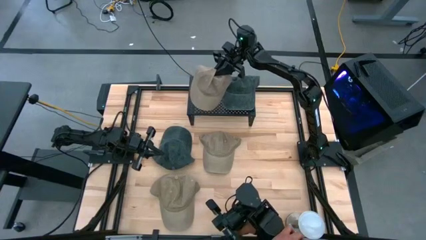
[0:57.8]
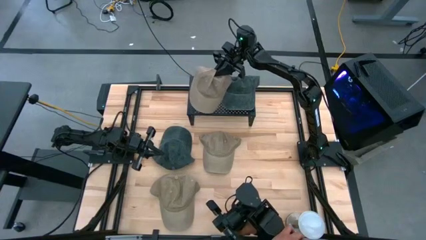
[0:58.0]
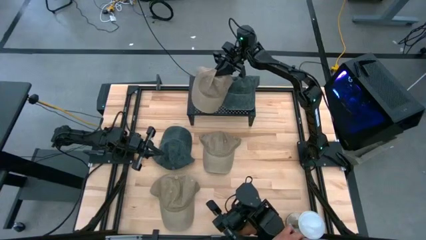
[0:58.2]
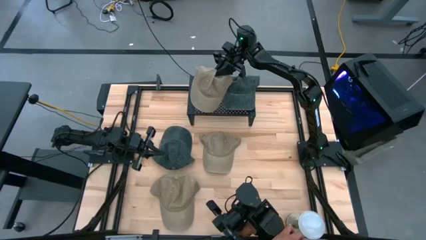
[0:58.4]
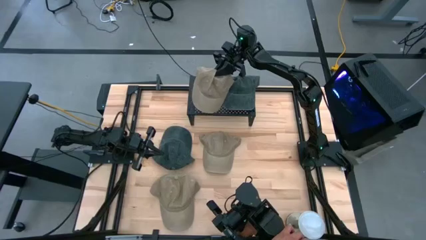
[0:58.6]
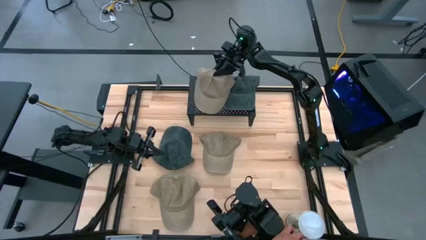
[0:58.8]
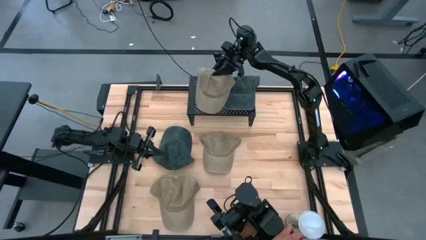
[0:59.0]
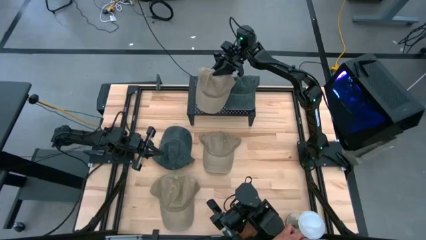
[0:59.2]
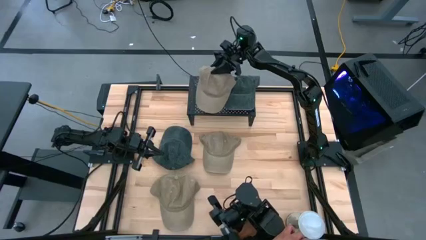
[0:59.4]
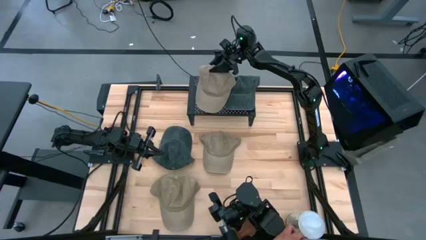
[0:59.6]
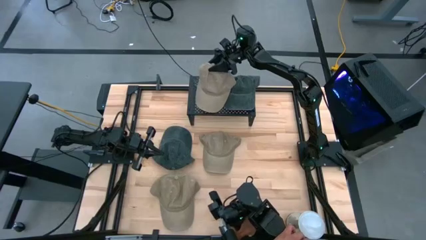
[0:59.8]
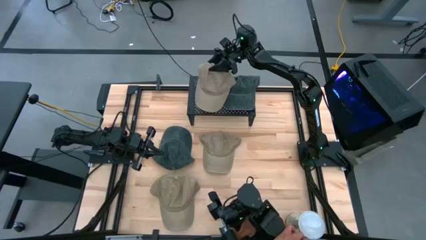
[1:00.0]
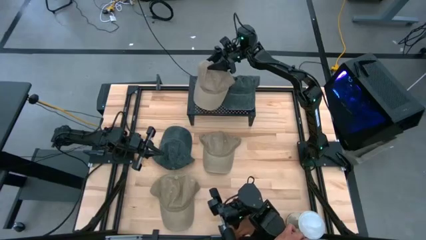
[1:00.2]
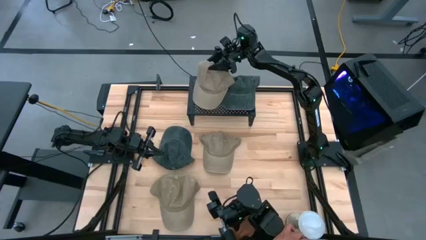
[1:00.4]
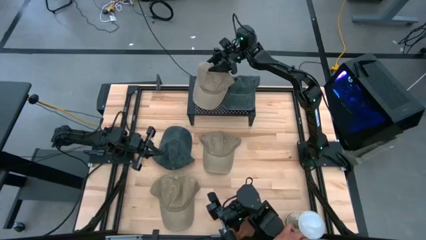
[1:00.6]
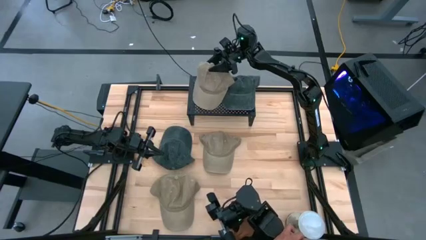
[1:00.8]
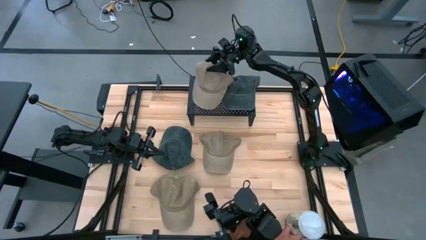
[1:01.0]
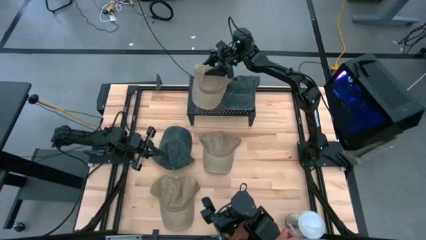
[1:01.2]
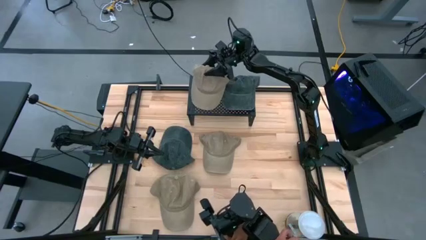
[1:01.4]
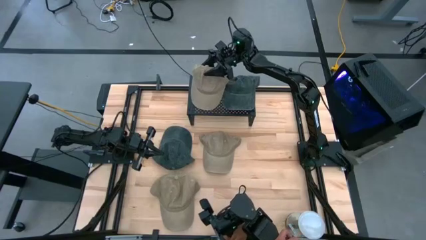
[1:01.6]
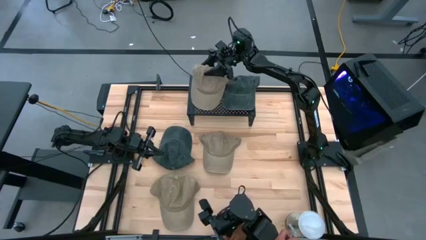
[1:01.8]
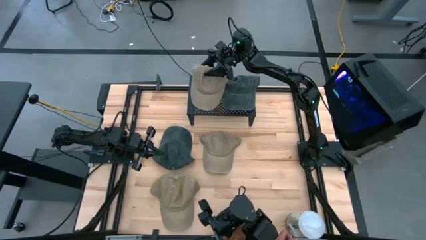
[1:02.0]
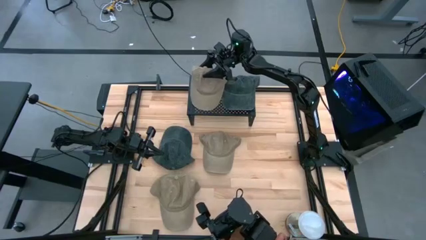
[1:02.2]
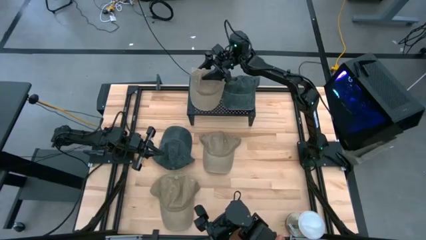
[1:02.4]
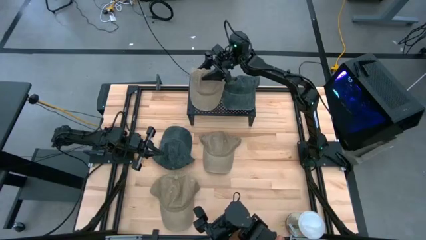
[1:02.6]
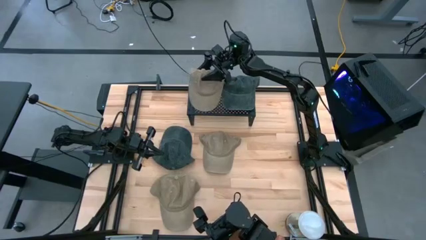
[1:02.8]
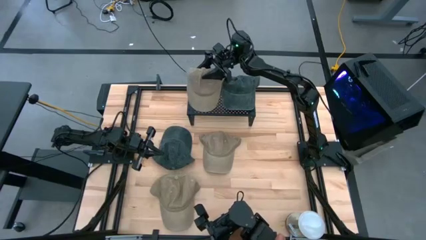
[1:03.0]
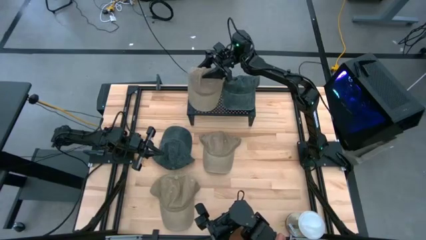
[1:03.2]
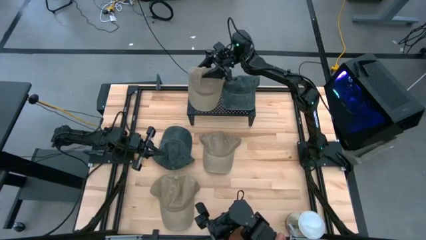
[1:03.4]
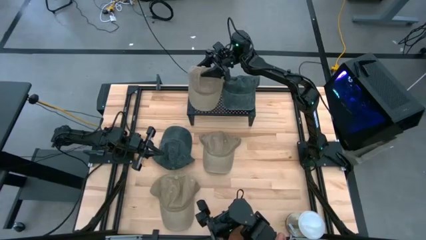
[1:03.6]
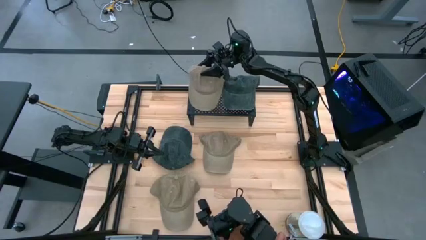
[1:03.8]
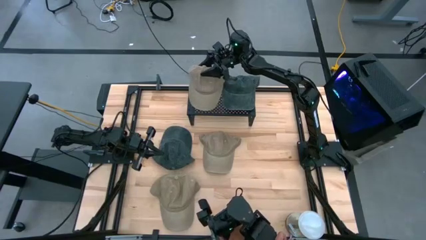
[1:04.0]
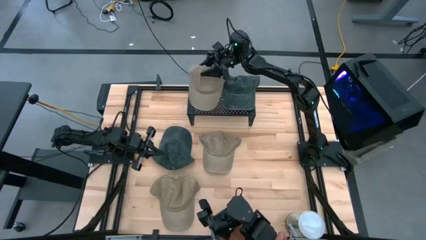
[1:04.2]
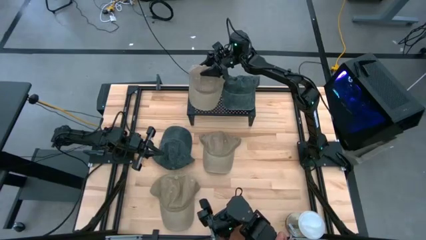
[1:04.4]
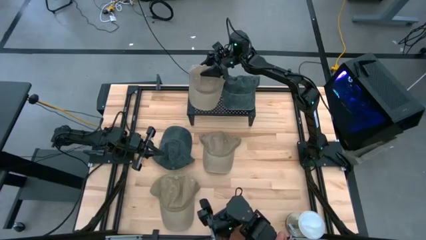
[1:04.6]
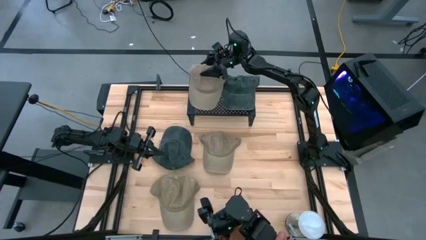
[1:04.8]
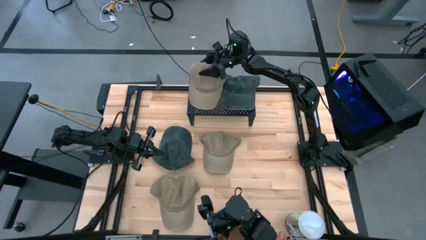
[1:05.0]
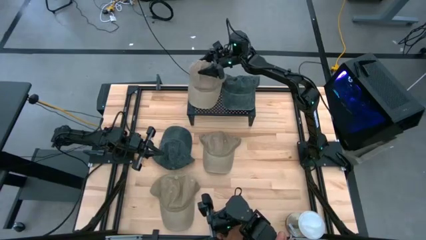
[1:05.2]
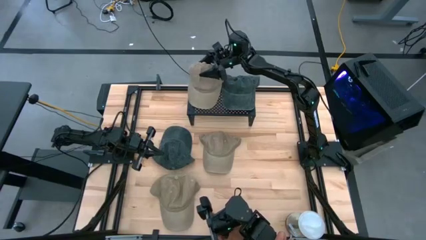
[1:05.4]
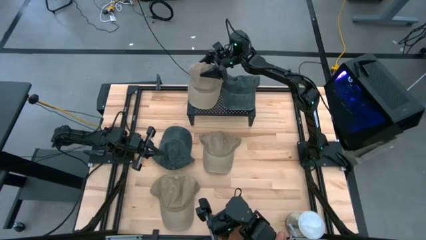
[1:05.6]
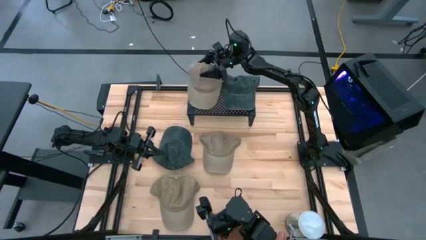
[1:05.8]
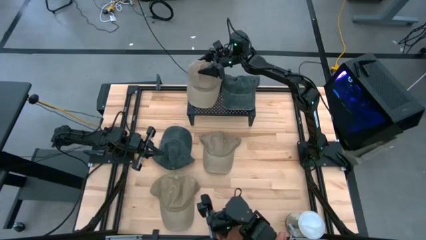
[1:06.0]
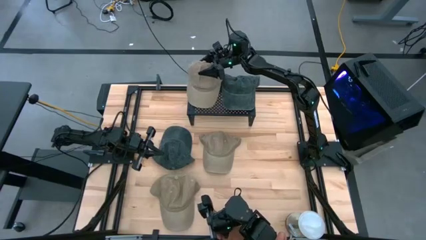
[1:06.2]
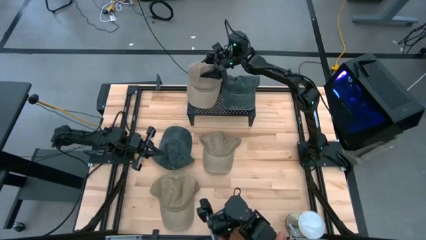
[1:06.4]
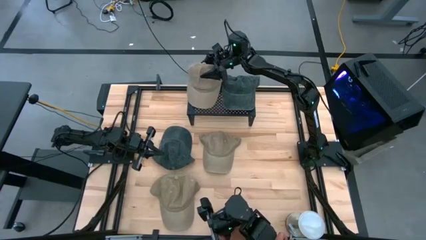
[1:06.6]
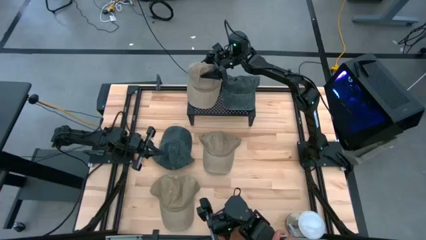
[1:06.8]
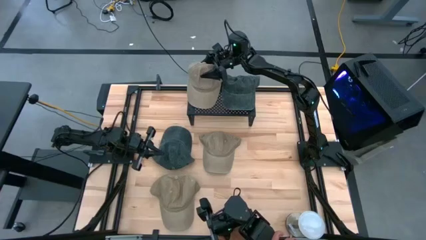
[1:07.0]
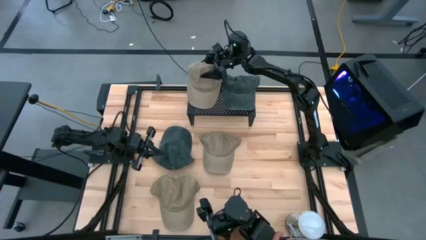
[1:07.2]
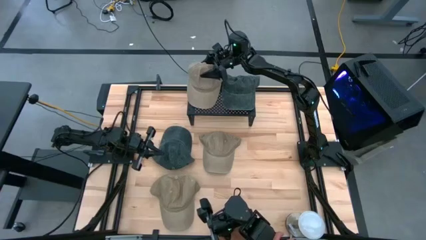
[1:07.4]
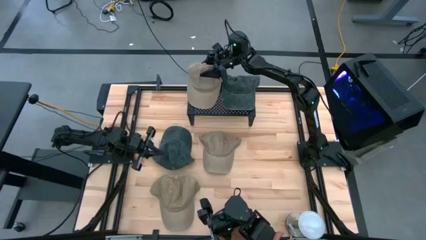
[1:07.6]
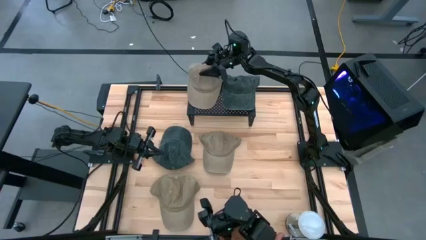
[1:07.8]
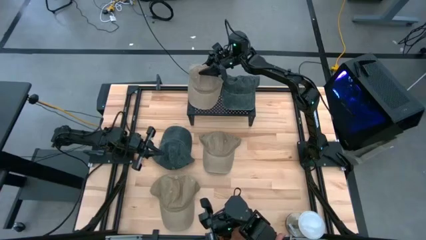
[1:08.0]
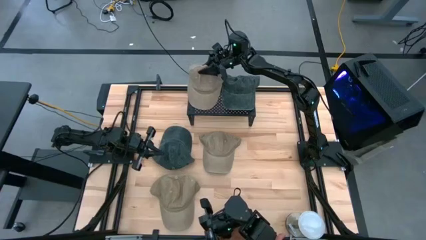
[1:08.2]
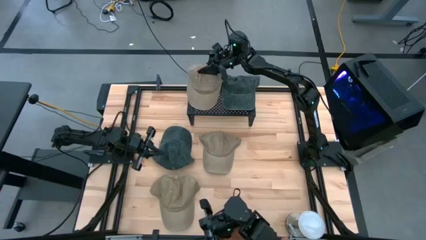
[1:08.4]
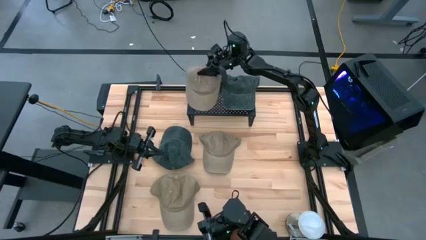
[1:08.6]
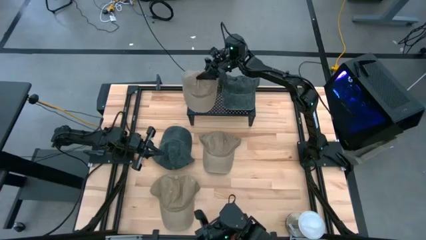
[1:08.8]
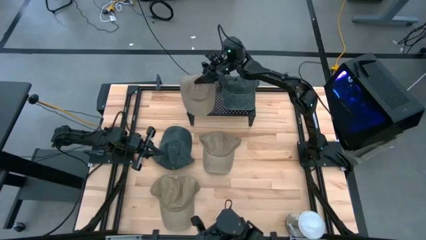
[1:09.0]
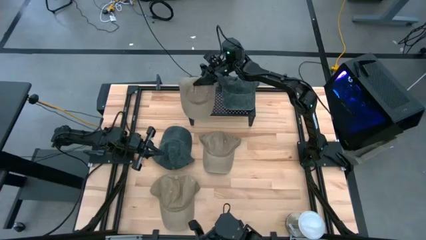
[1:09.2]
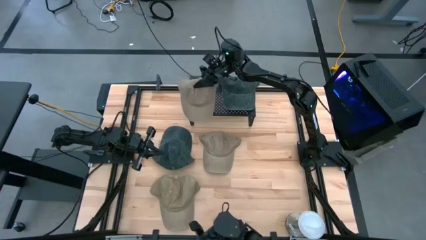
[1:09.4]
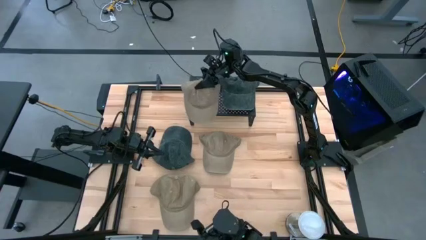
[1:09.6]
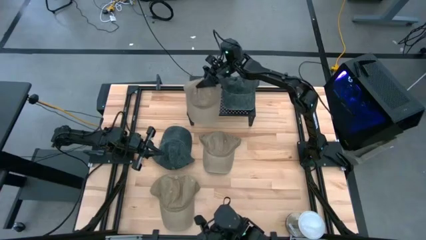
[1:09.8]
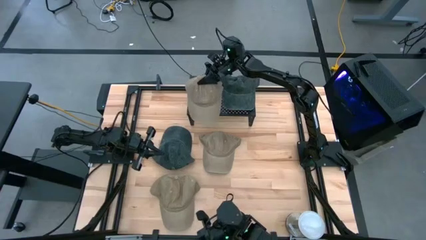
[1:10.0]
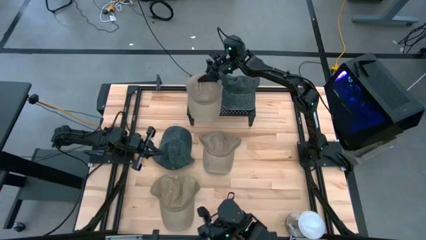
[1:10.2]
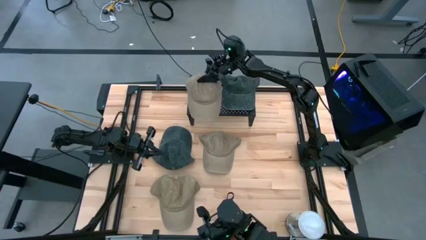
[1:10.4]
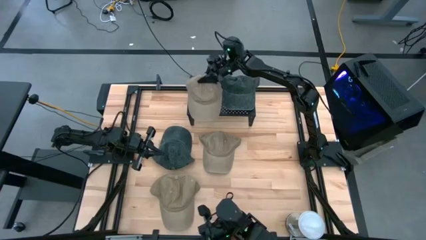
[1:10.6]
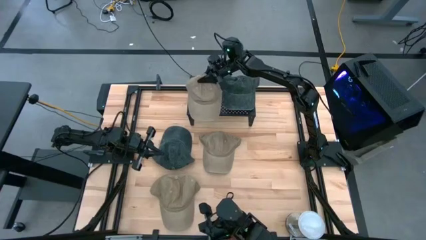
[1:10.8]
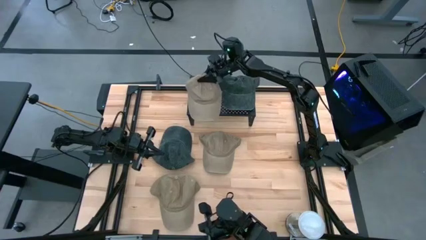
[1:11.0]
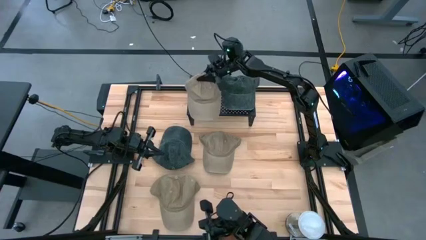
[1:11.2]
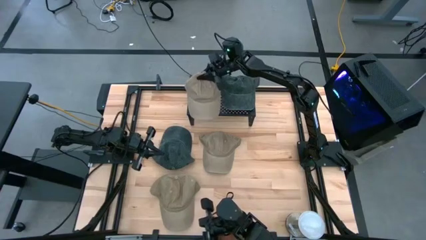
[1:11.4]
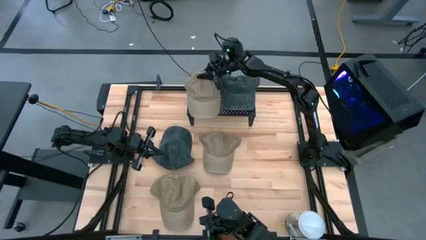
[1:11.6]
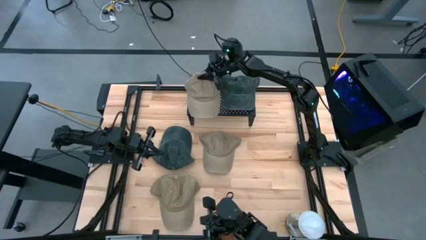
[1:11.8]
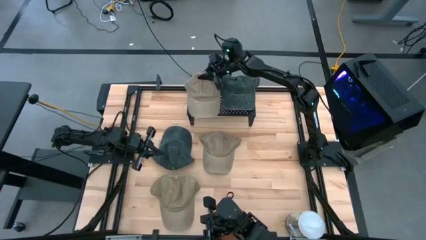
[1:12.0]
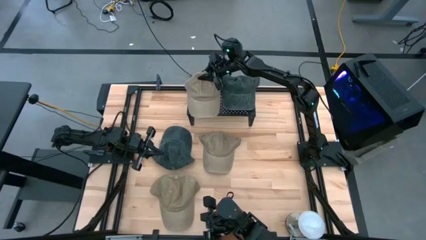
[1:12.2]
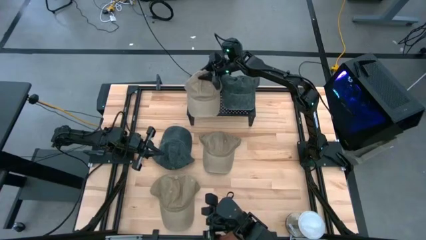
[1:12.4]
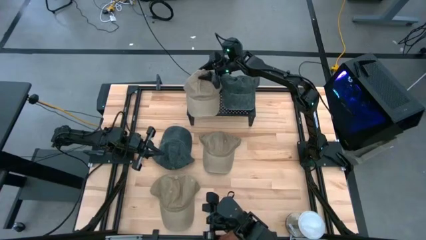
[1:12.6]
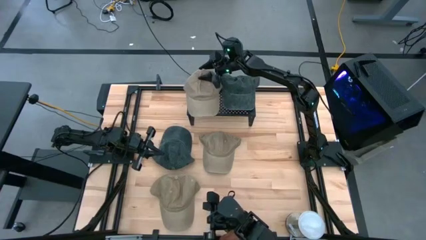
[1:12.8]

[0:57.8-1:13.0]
Task: Pick & Place hat
Put the bottom right brown cap on the shelf
